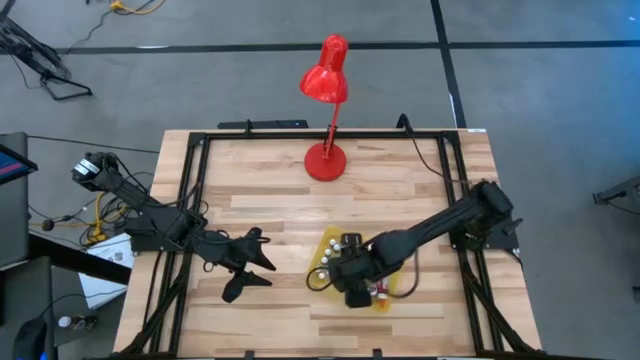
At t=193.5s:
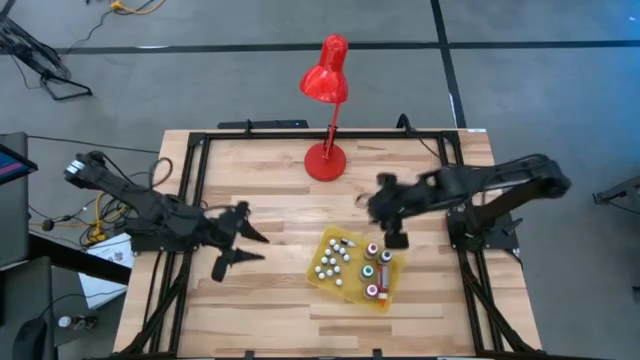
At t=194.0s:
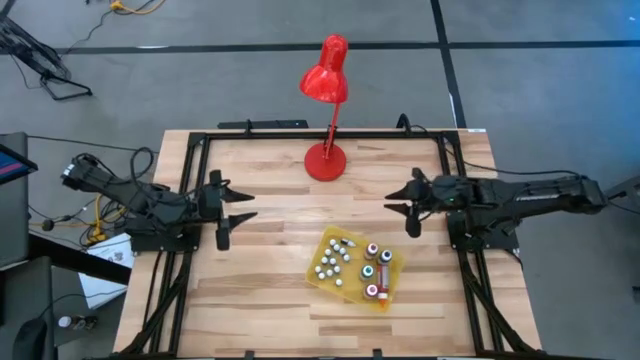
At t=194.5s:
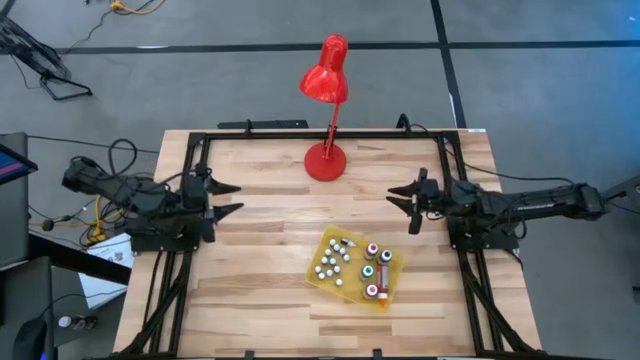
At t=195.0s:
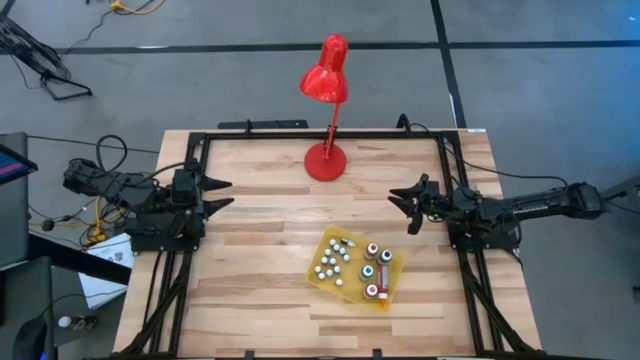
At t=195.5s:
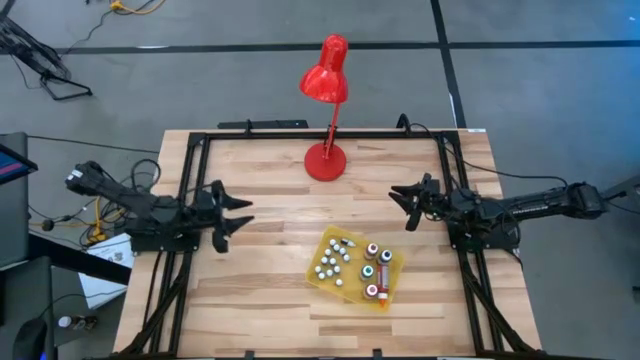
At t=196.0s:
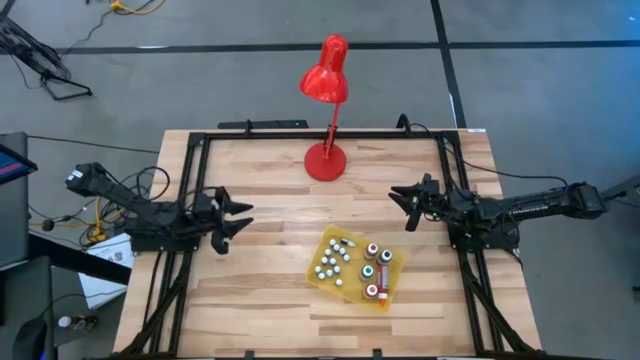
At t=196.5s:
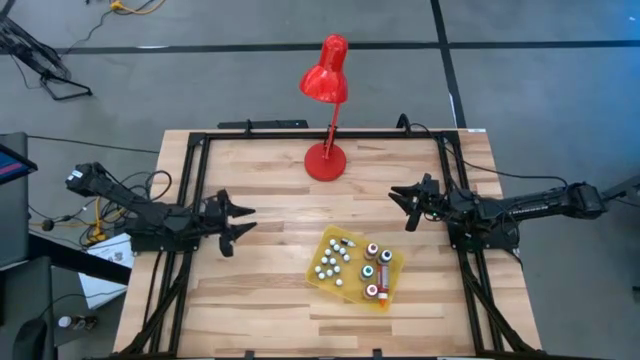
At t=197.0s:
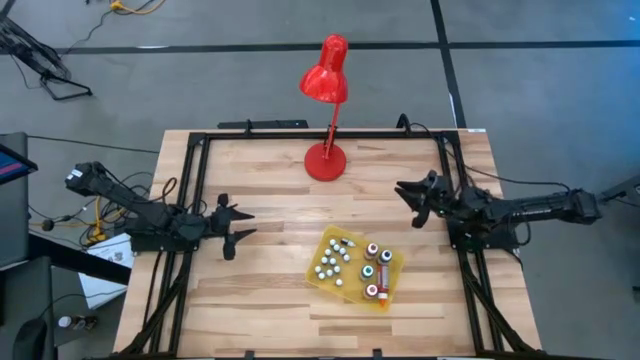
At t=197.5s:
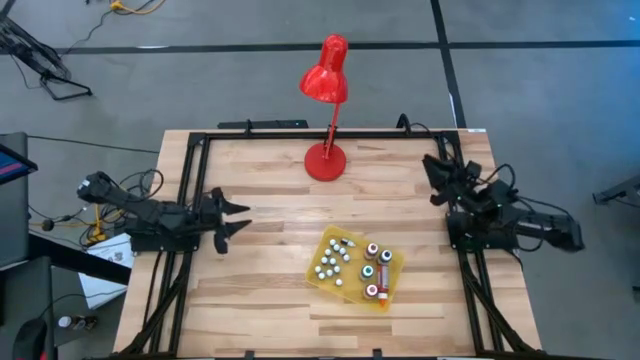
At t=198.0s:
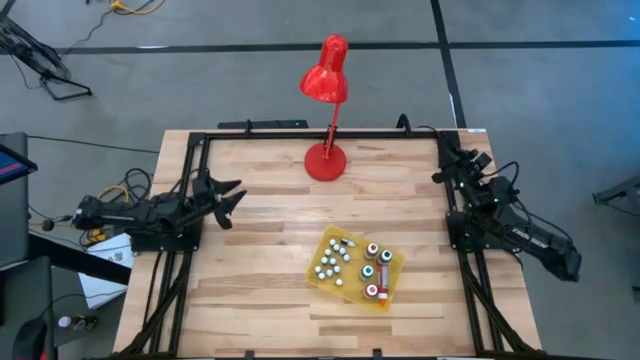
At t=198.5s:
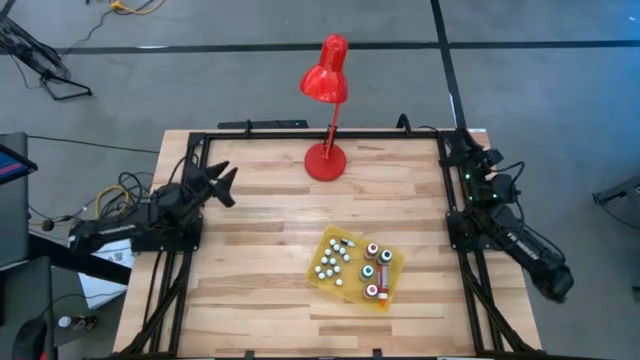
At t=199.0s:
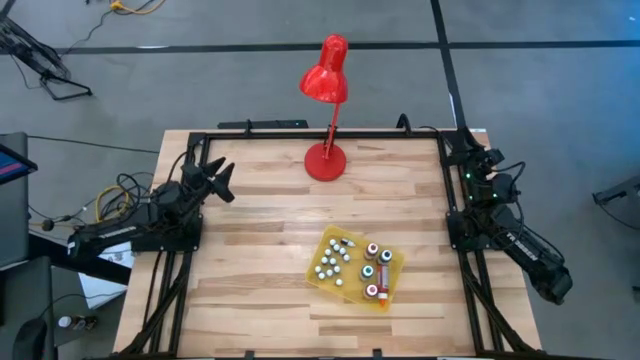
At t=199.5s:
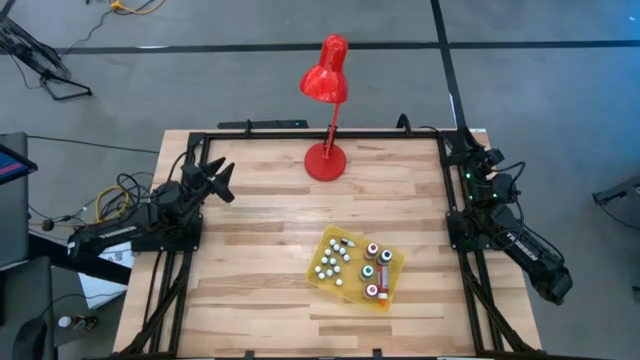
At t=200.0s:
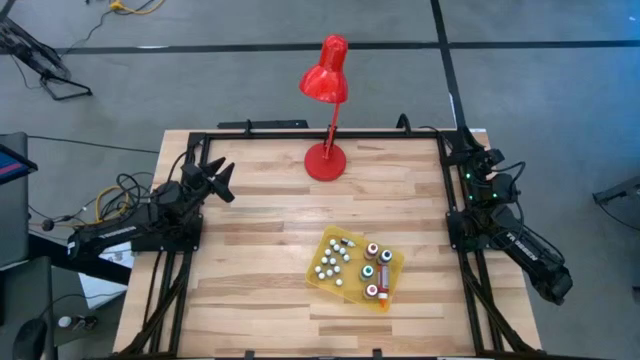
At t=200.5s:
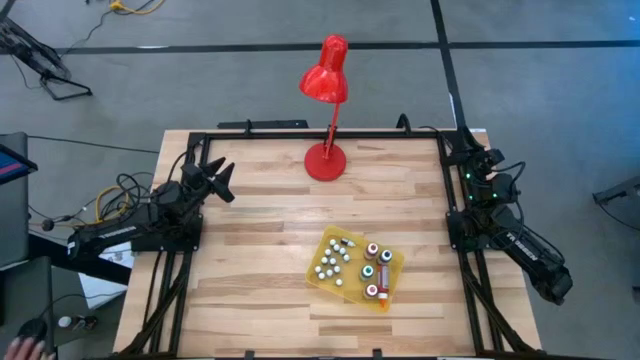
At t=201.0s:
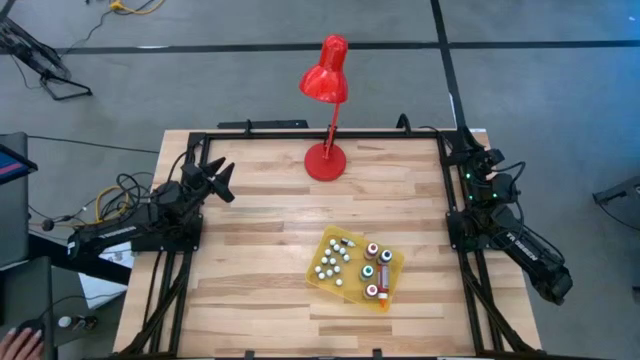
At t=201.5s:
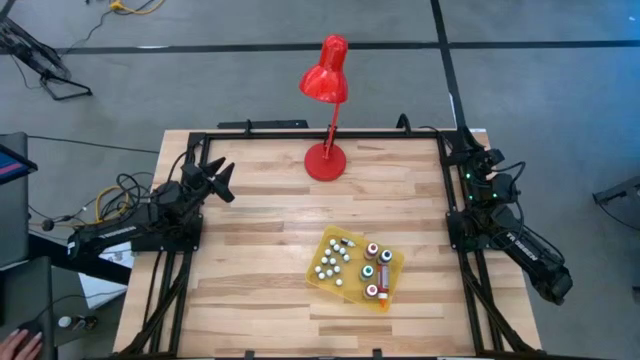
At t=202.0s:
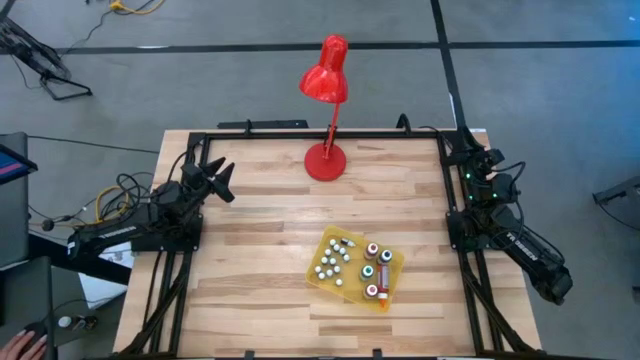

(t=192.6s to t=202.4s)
Task: Pick & Place food coloring
Return to Home Position

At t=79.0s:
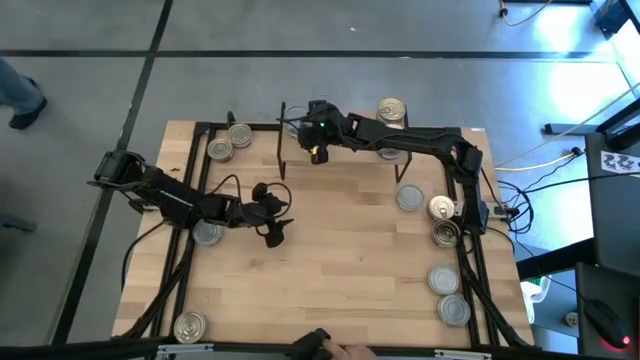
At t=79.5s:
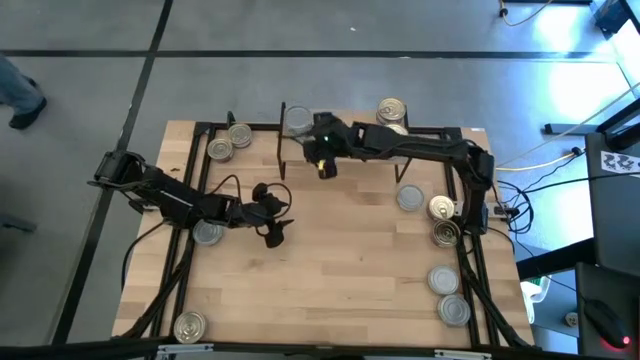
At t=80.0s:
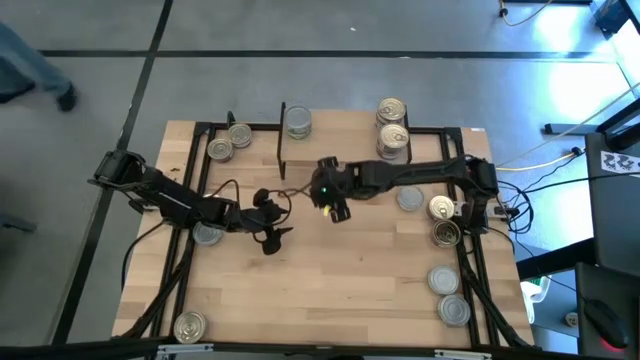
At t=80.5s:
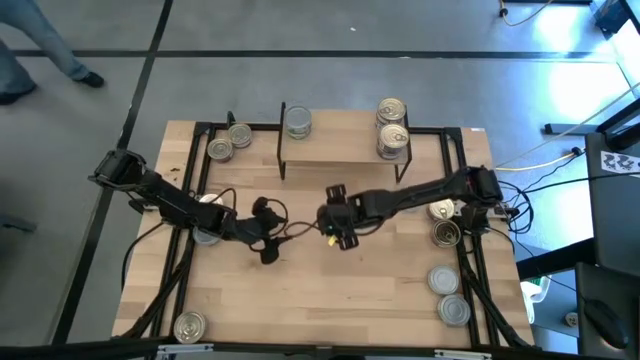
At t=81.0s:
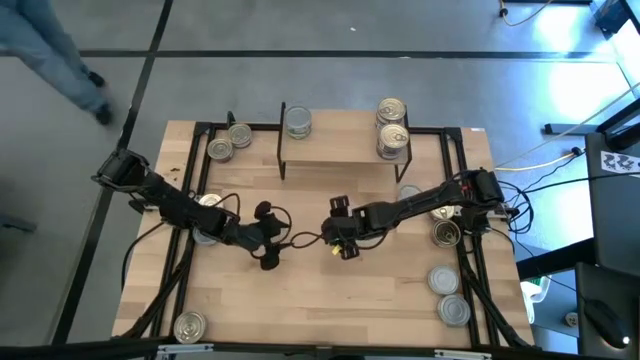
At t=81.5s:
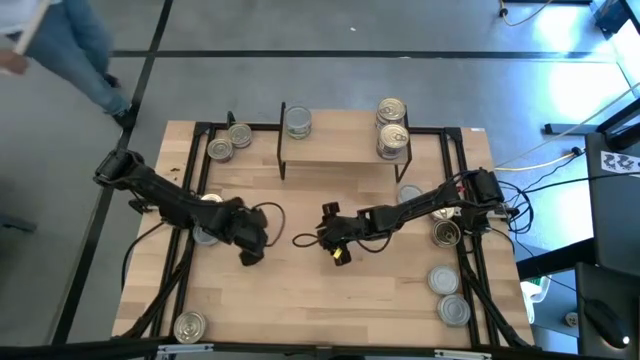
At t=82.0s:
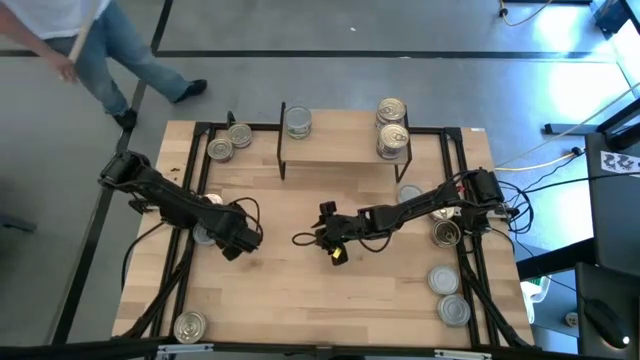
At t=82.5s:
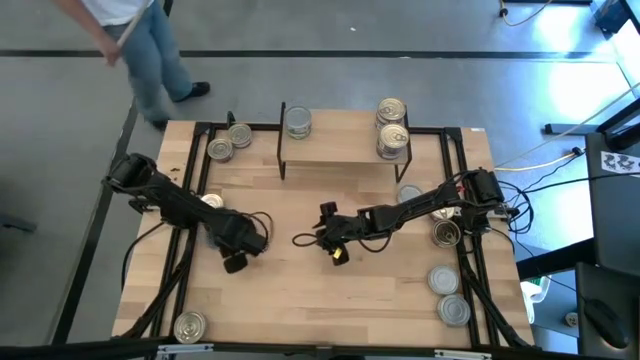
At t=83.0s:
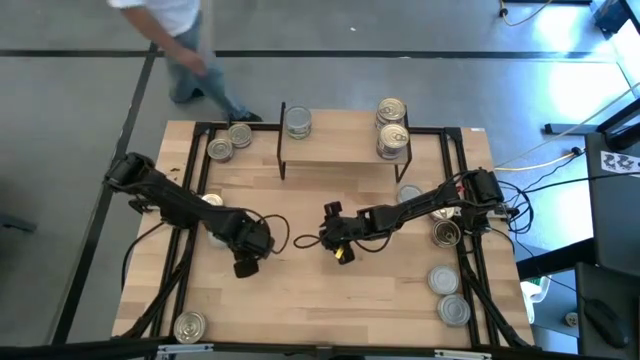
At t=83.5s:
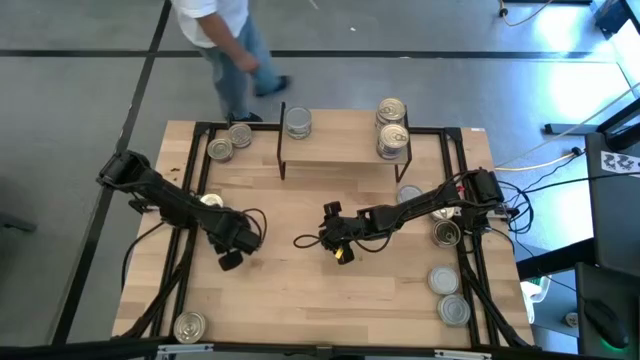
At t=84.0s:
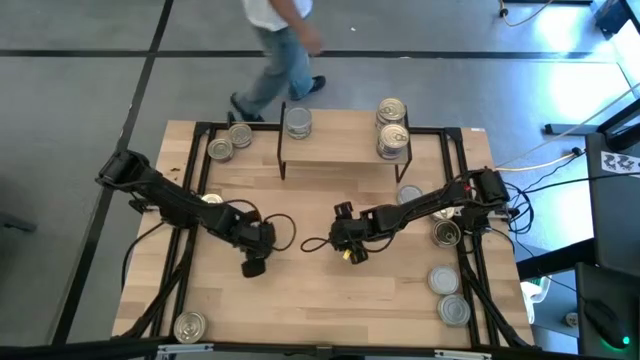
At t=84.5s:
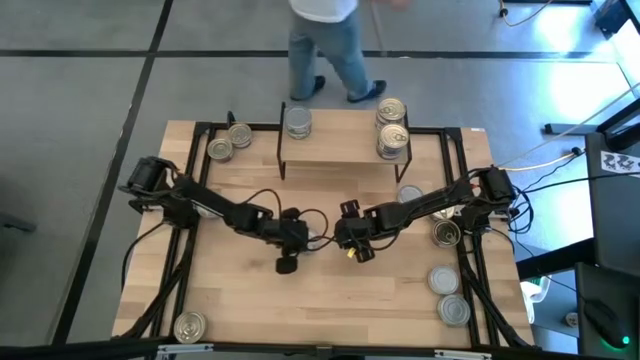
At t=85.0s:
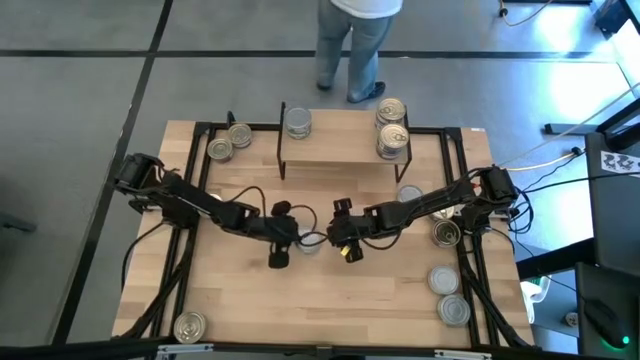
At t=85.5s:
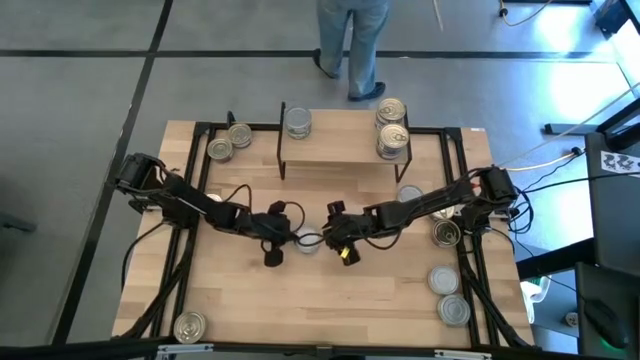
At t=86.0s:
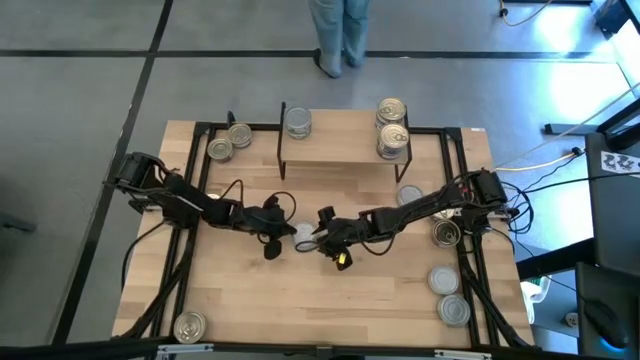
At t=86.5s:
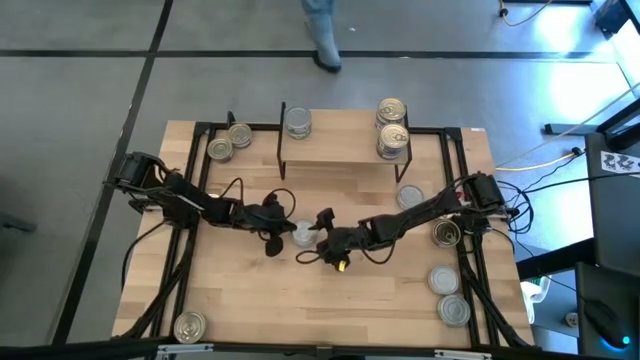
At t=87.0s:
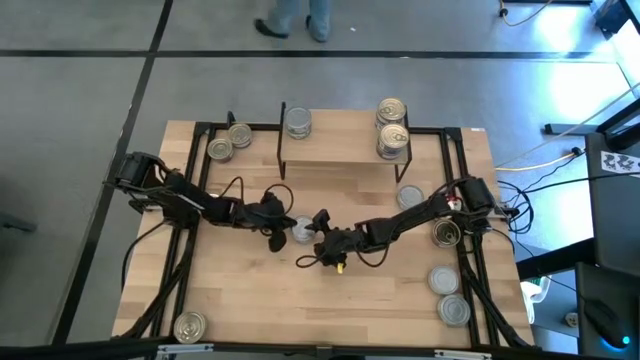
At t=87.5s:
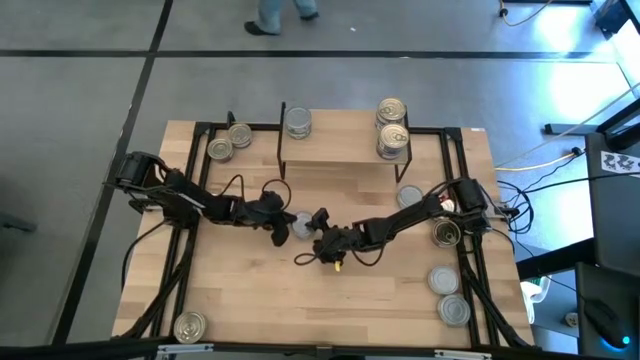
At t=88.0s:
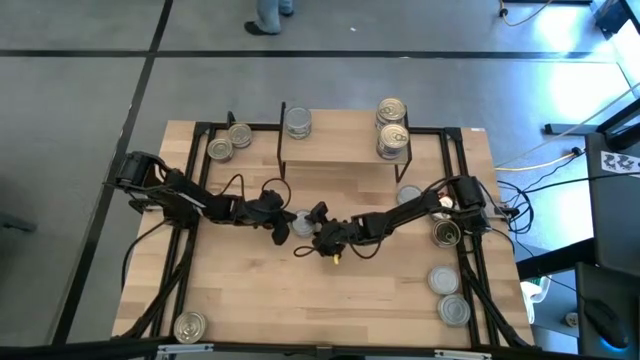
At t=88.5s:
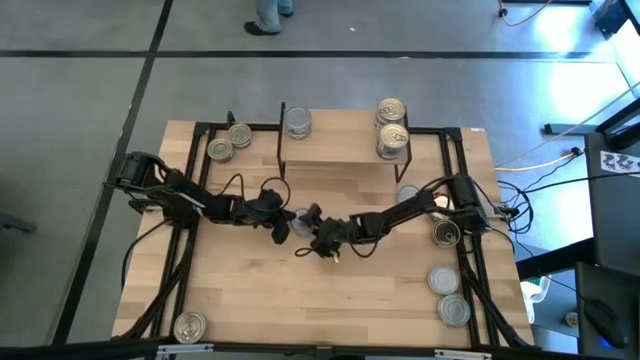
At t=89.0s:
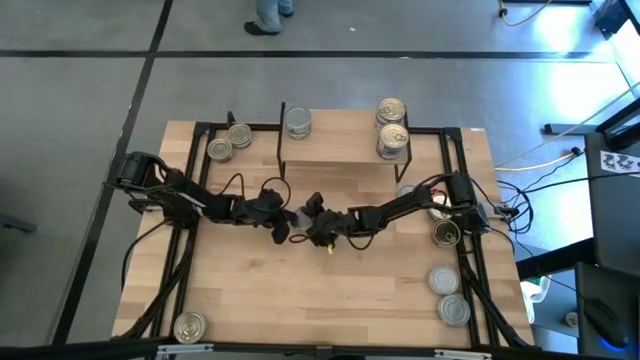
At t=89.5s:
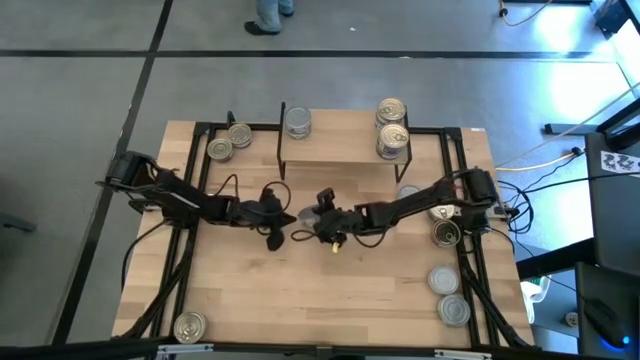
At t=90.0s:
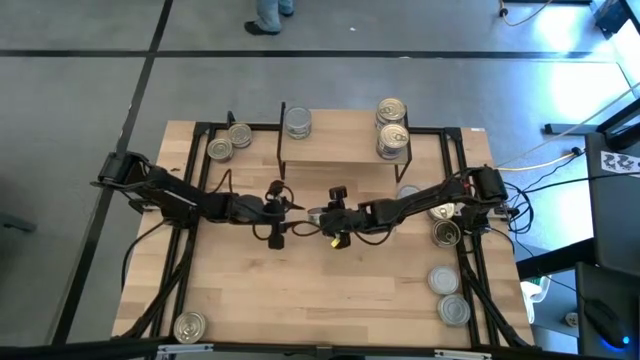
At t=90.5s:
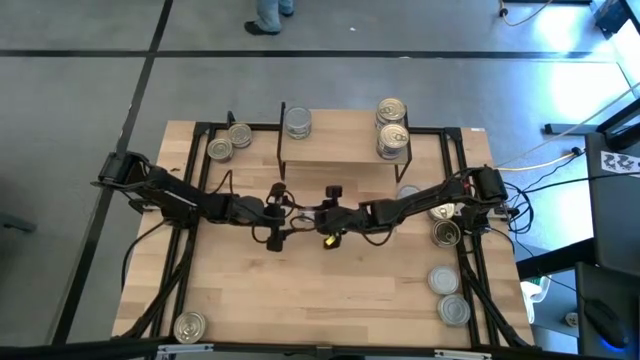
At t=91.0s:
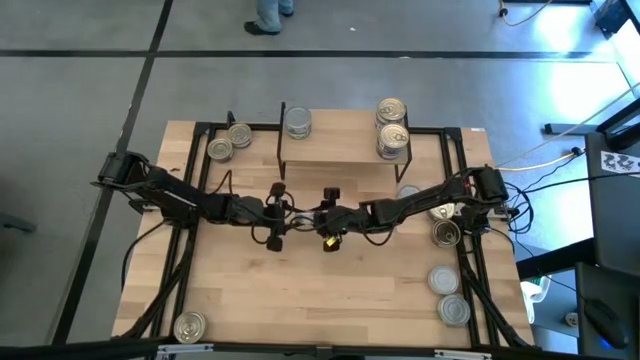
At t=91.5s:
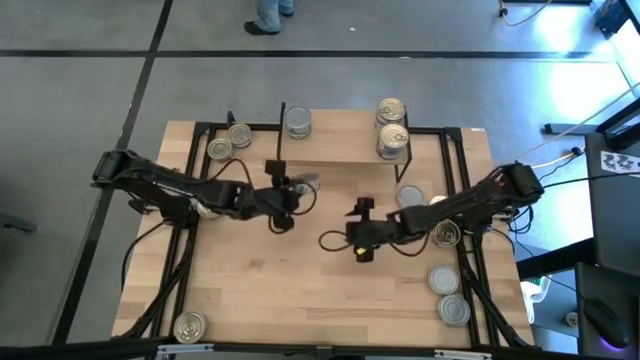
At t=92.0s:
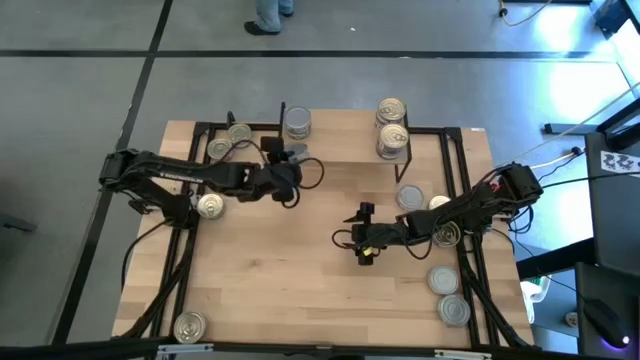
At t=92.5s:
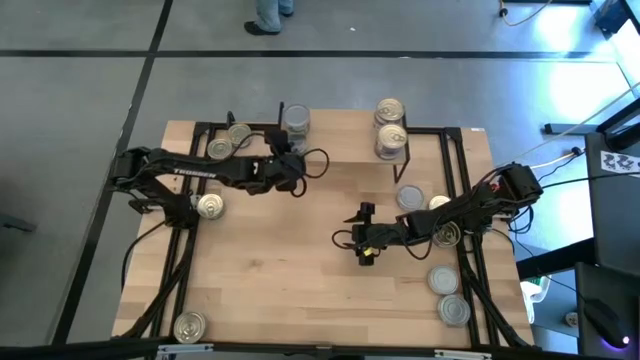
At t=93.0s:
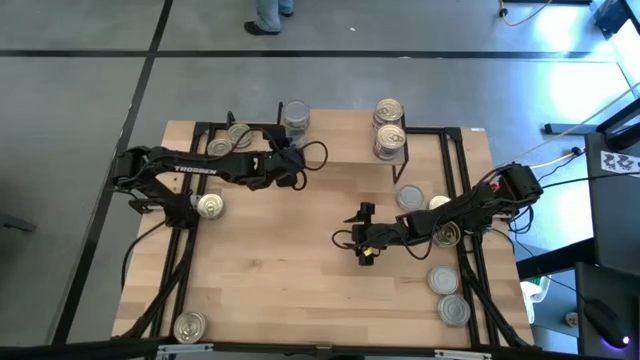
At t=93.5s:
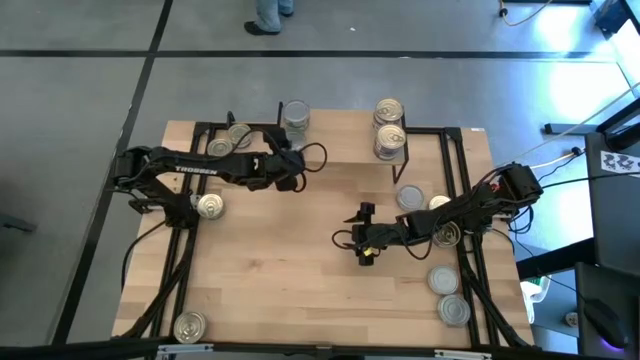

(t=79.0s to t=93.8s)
Task: Stack canned seafood by type on shelf
Put the green white tuna can on the shelf
